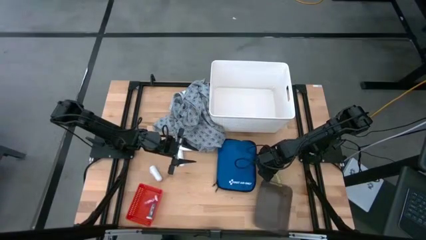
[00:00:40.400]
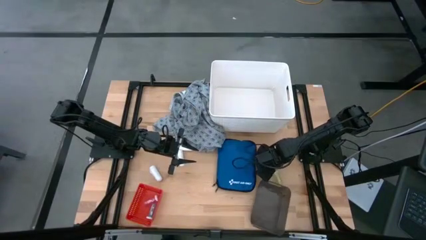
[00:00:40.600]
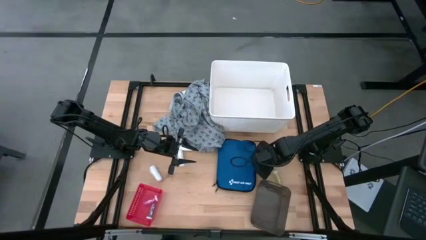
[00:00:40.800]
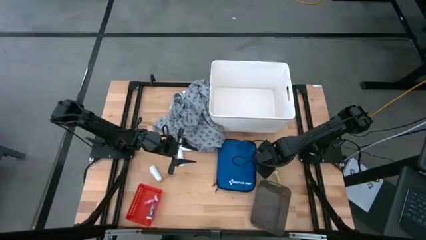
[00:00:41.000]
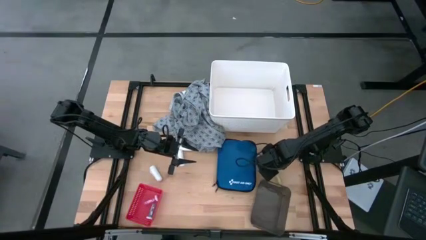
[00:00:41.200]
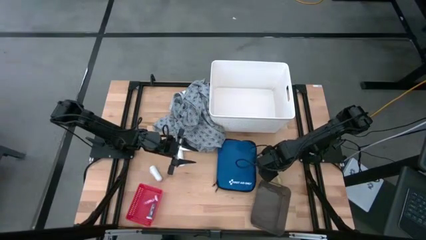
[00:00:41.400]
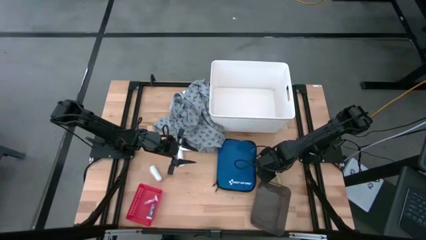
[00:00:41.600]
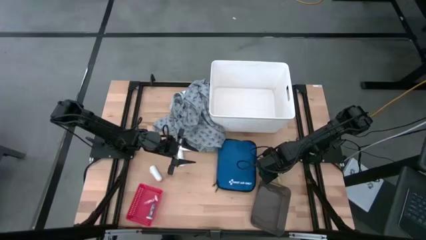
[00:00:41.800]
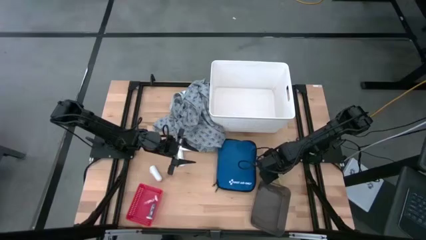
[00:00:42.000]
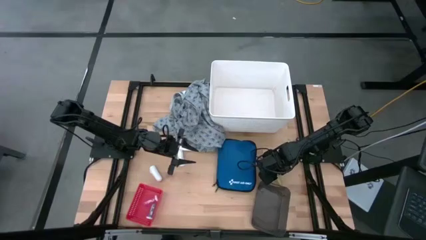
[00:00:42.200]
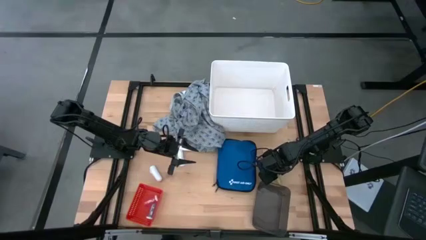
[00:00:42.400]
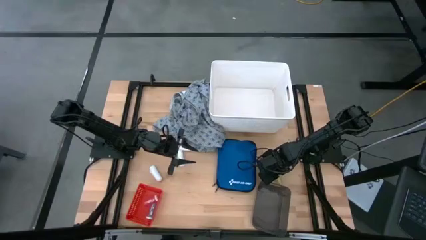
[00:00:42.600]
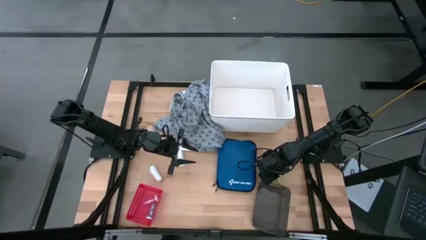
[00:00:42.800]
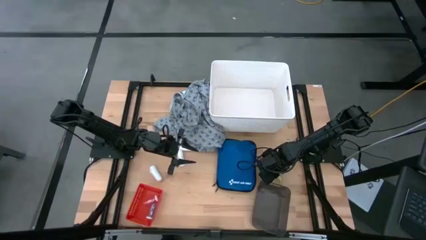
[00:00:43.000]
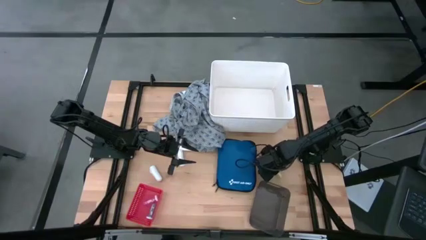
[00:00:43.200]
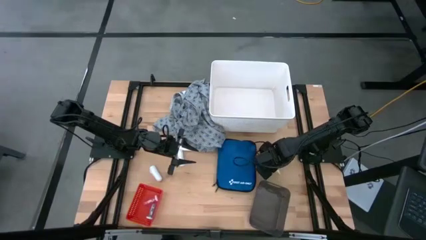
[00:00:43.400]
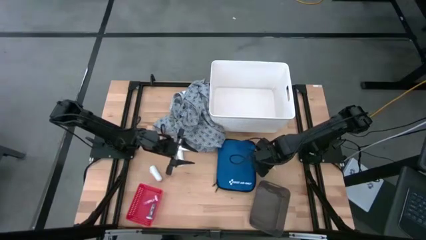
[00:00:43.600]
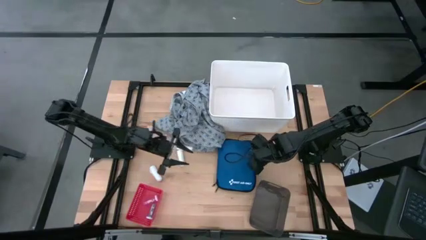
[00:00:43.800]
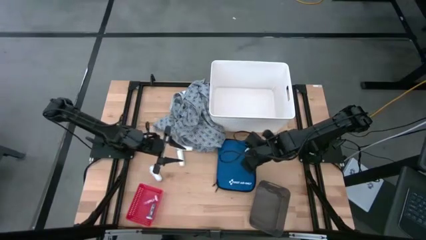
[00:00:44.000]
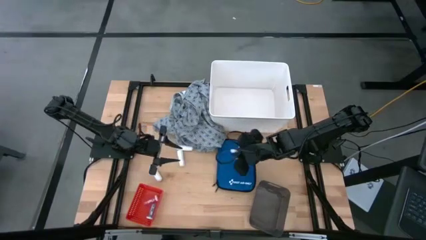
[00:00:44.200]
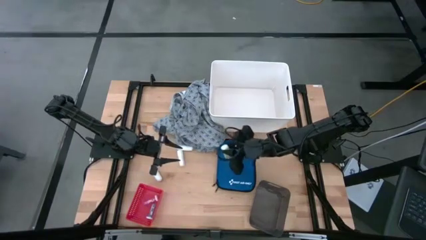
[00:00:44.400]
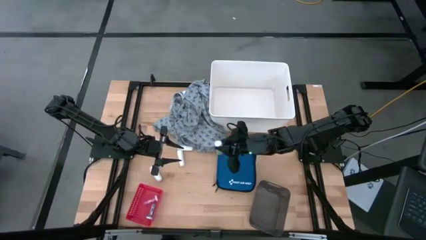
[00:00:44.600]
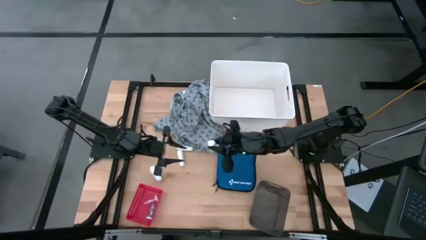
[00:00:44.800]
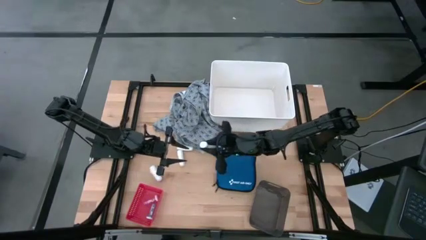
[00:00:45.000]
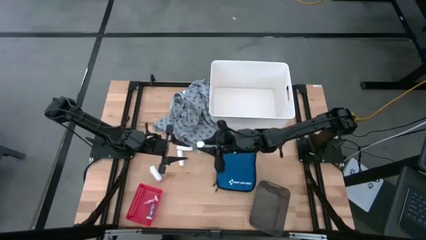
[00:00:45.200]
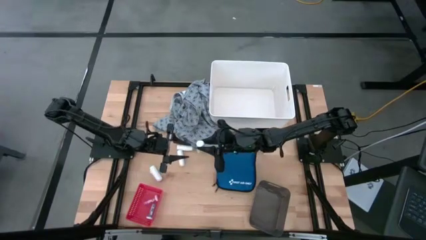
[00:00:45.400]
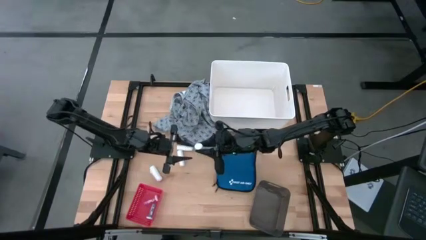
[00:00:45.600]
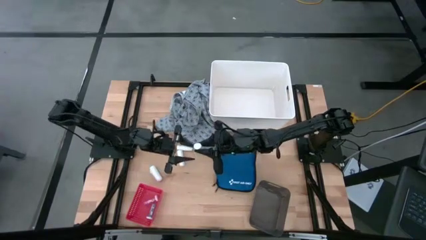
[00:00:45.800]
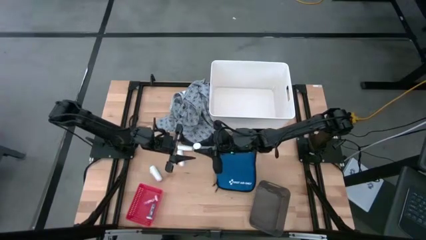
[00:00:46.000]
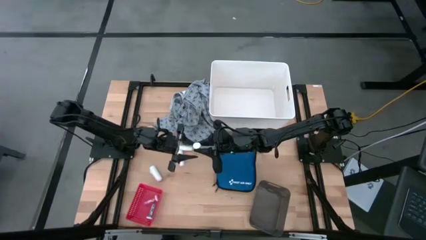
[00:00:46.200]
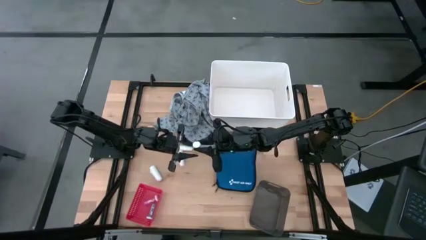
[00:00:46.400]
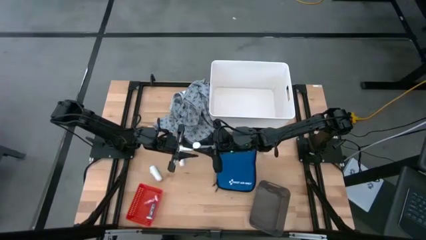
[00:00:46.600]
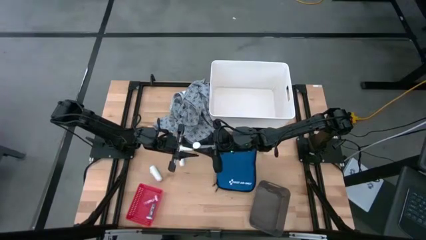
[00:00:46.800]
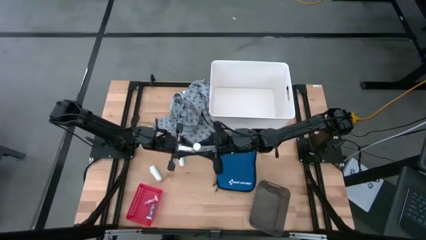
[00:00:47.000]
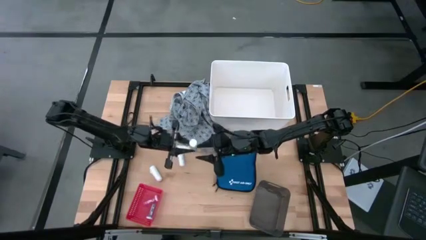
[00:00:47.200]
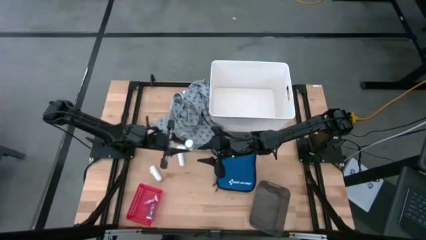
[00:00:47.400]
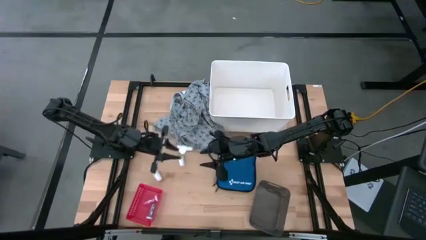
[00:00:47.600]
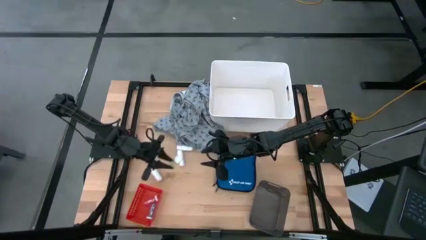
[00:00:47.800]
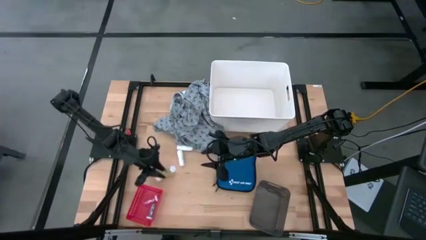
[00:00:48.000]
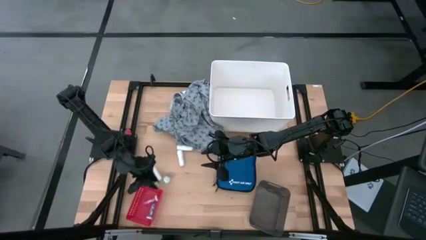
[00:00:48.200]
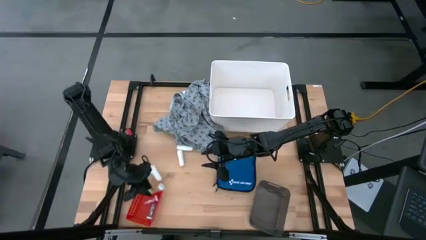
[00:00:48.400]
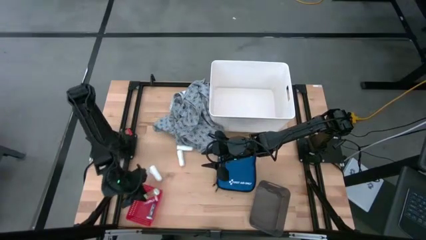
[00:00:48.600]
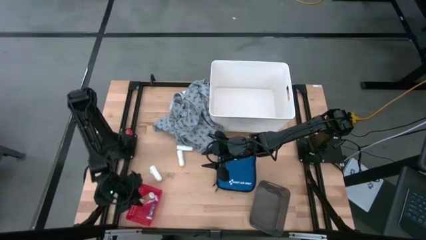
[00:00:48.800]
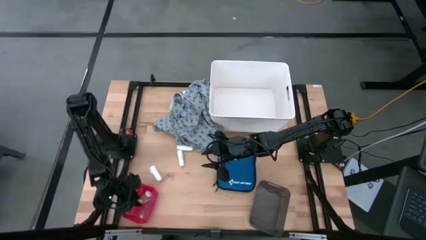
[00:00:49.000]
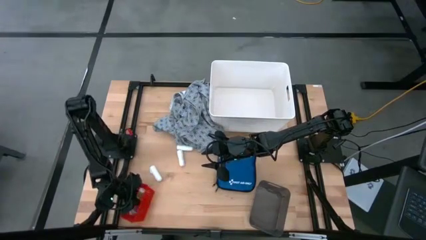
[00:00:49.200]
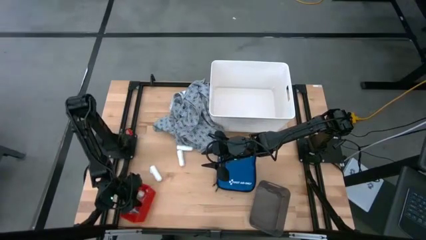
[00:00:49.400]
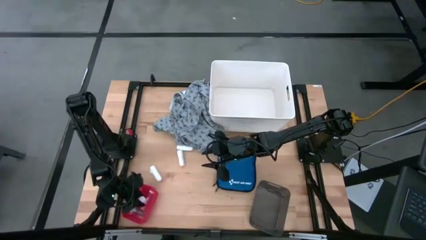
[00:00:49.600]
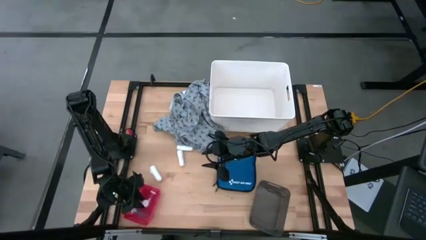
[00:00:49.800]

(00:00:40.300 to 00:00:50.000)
Task: Pick & Place Medicine items
Put the yellow pill bottle into the red bin

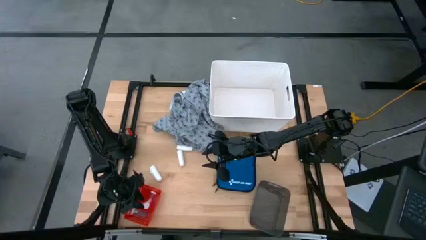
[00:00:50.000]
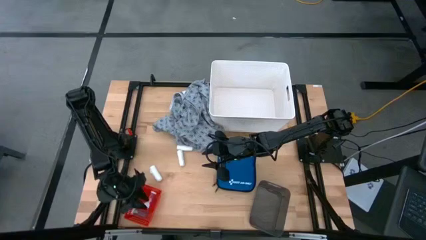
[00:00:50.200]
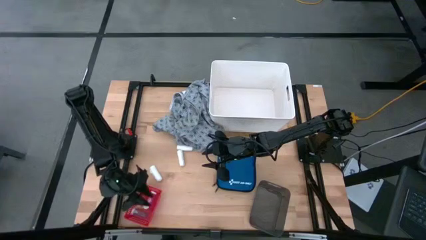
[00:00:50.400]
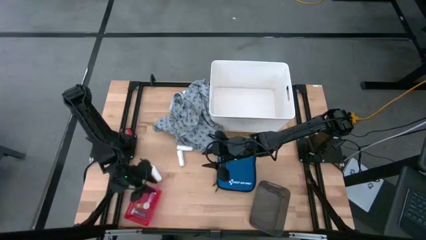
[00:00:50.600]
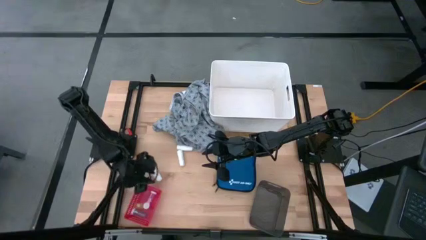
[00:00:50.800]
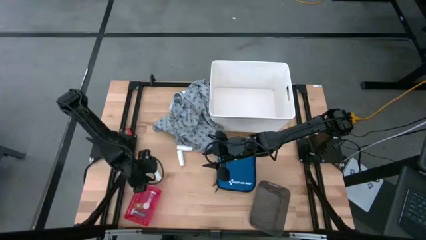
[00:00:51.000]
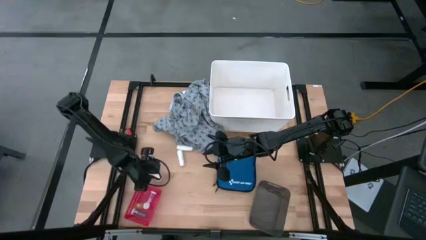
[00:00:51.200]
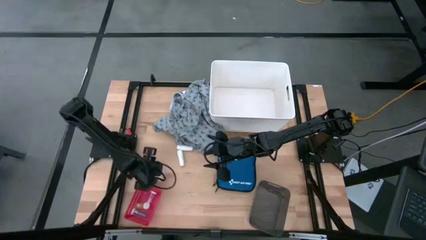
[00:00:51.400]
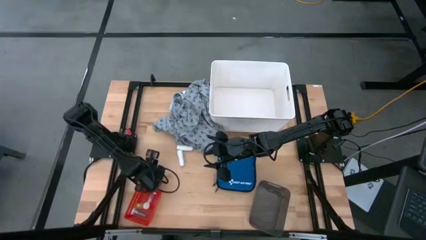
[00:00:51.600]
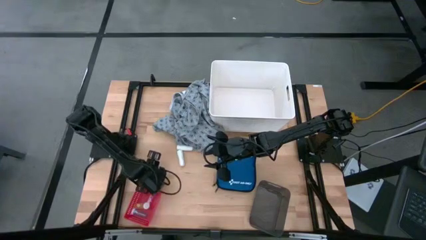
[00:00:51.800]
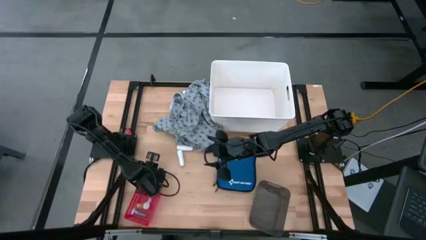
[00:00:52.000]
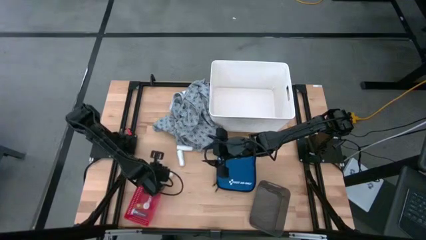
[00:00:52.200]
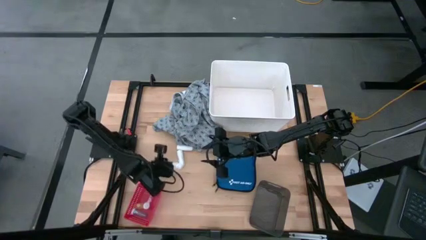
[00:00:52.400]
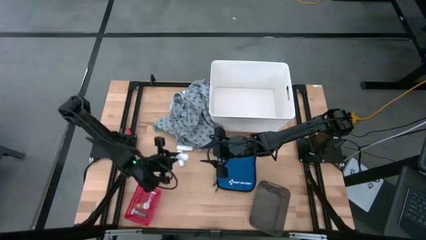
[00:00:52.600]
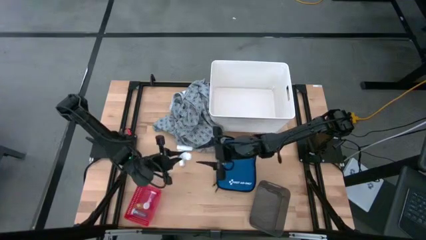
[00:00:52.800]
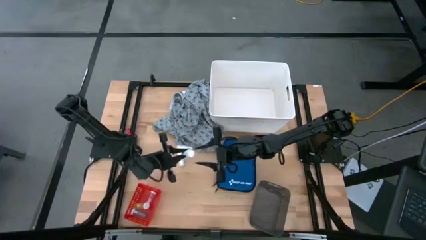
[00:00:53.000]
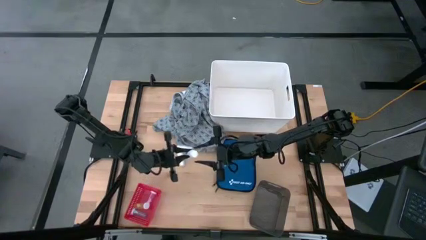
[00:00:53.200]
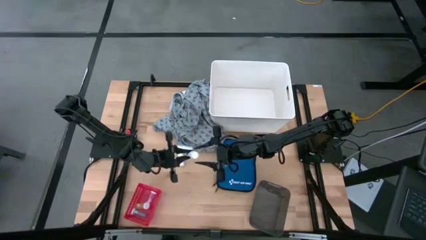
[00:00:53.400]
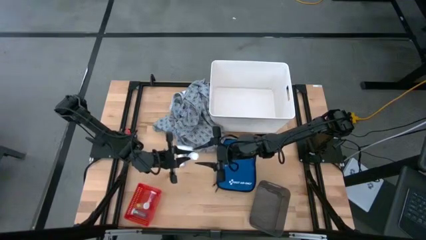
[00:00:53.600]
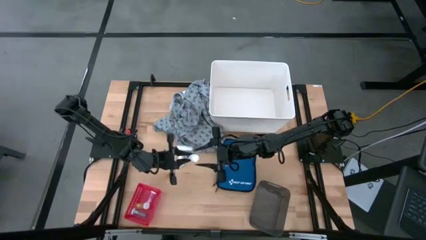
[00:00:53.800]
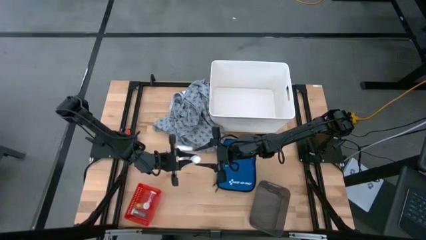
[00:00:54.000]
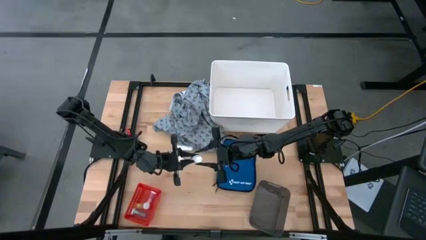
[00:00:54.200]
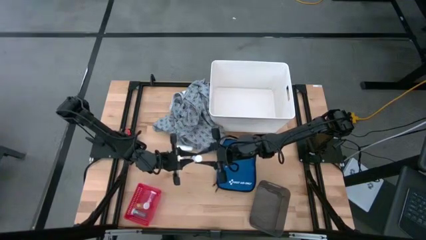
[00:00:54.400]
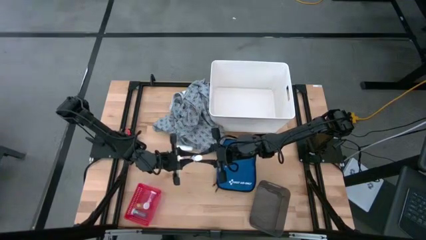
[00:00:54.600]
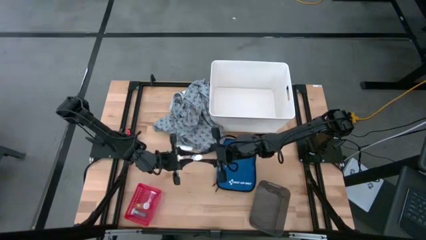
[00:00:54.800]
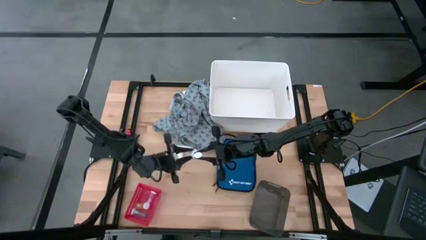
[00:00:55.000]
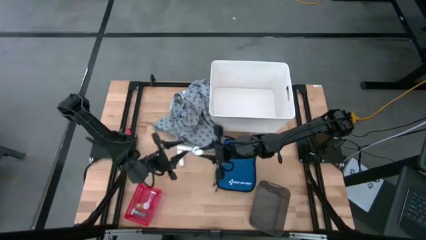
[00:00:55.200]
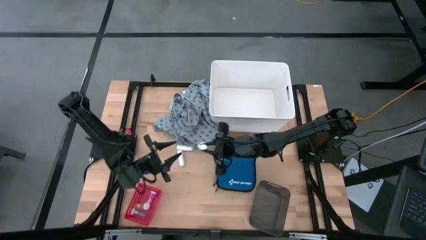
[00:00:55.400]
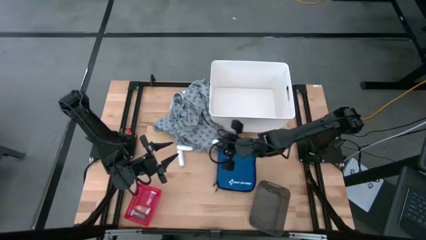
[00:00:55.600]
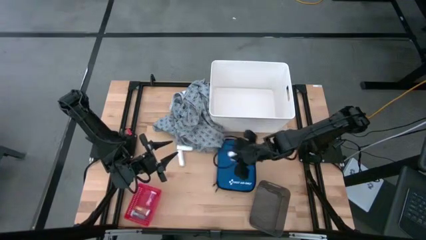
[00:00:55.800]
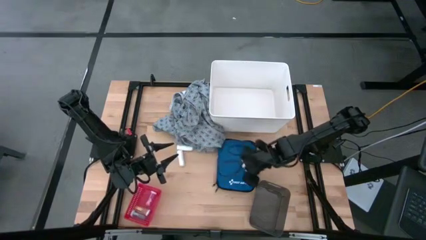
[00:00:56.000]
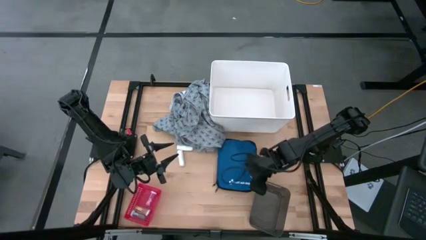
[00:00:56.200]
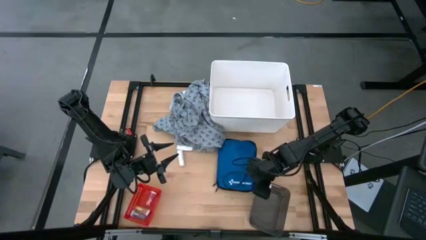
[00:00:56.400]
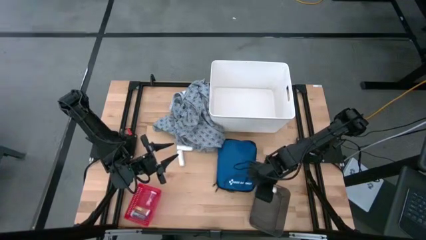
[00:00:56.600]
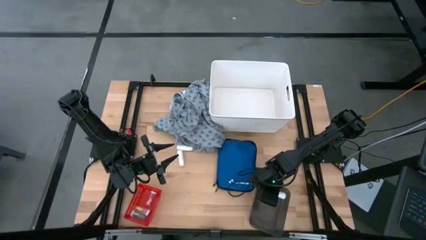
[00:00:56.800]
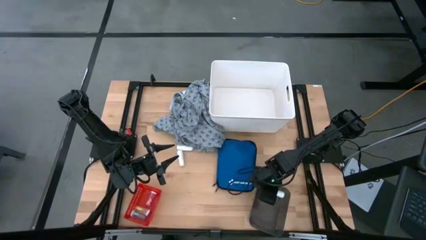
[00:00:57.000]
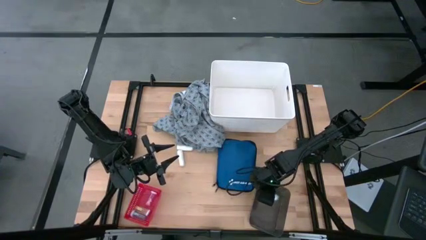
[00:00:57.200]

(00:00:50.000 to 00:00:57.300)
Put the bottom white rolled gauze into the black bin
